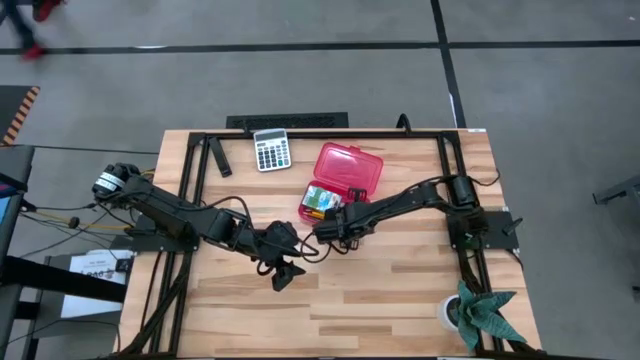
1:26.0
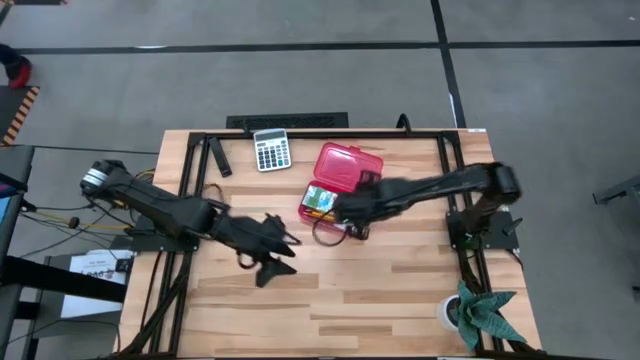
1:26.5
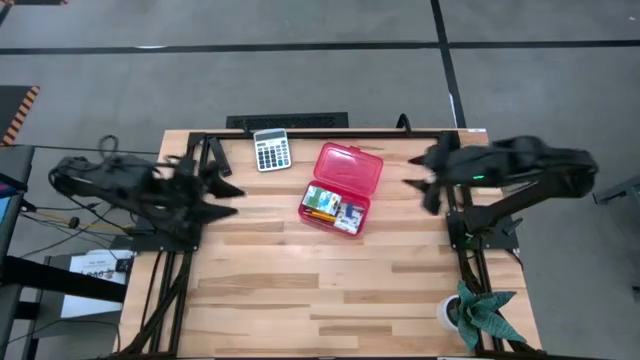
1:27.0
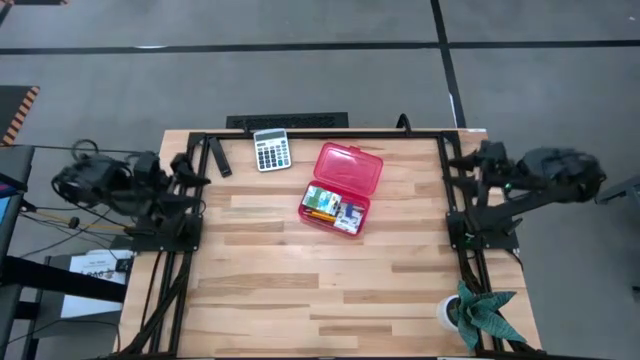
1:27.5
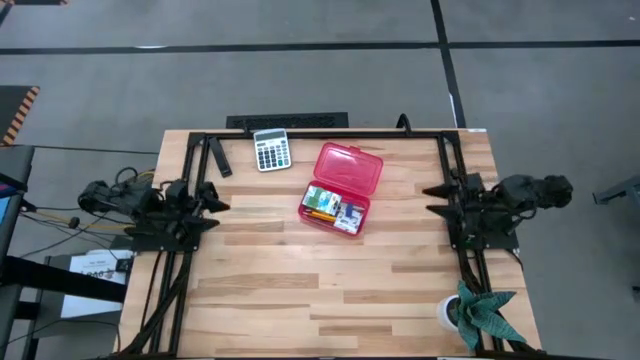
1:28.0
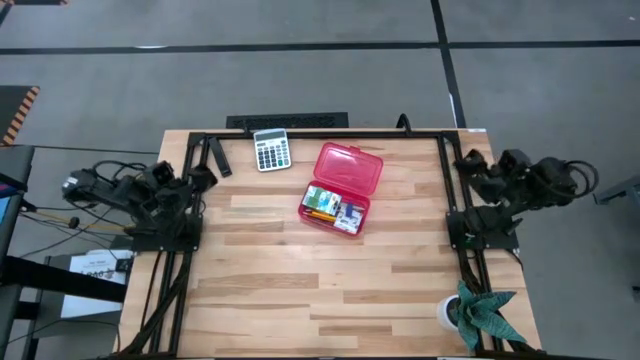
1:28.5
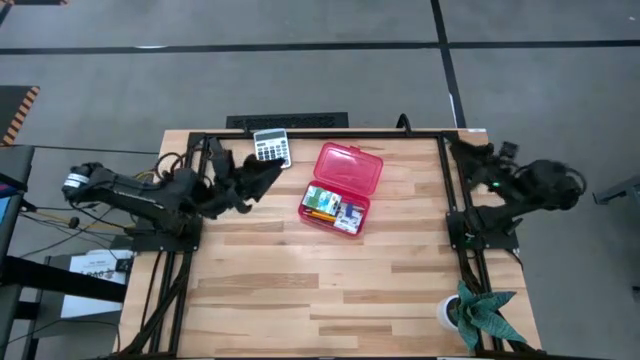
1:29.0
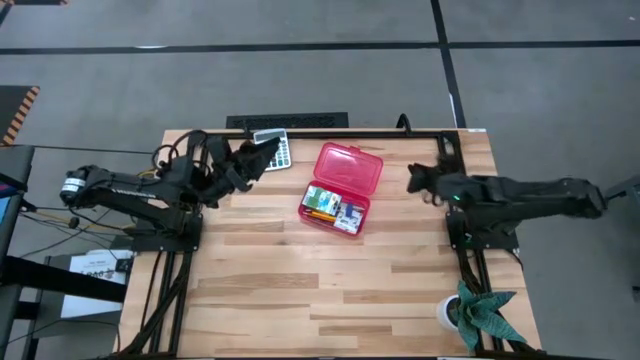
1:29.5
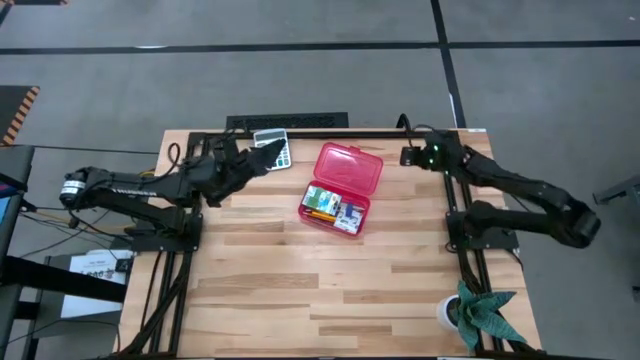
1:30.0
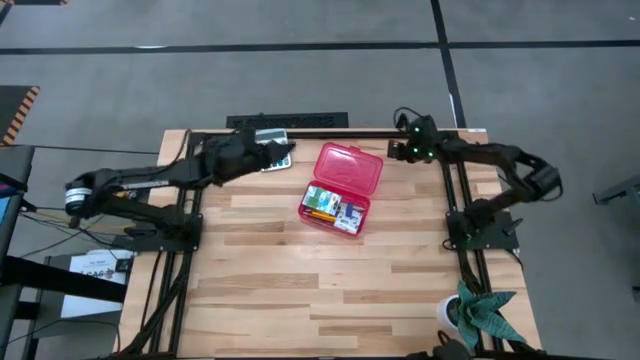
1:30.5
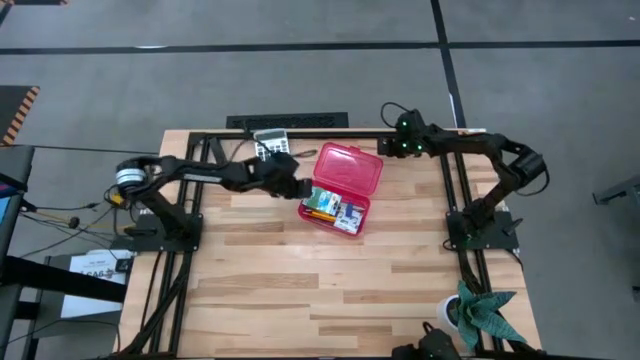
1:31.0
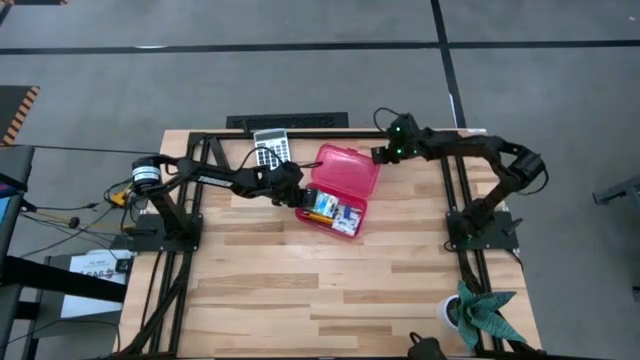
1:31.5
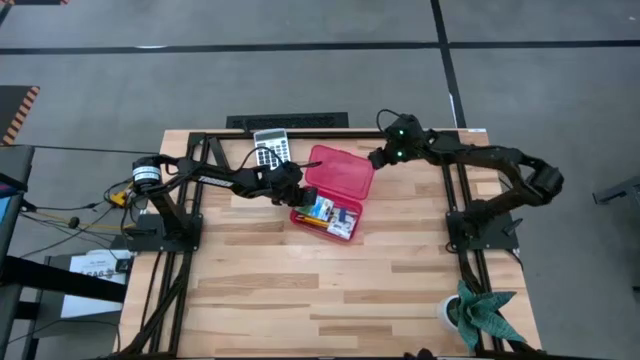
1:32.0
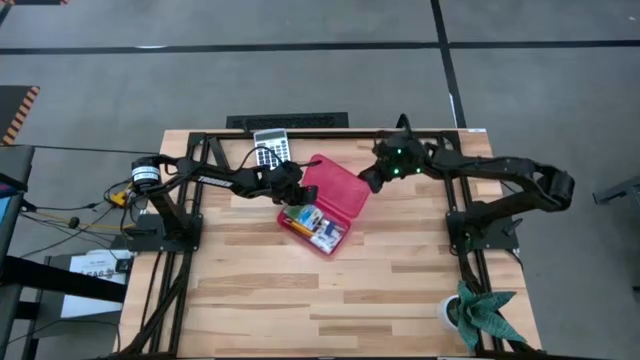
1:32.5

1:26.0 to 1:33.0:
Task: Pack school essentials
Close the supply box

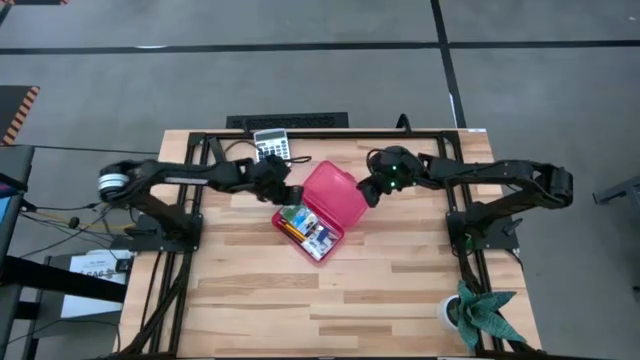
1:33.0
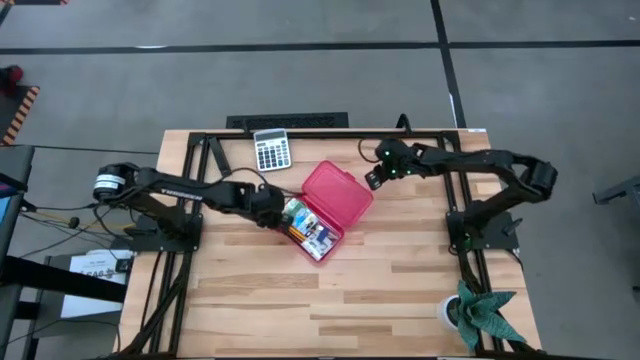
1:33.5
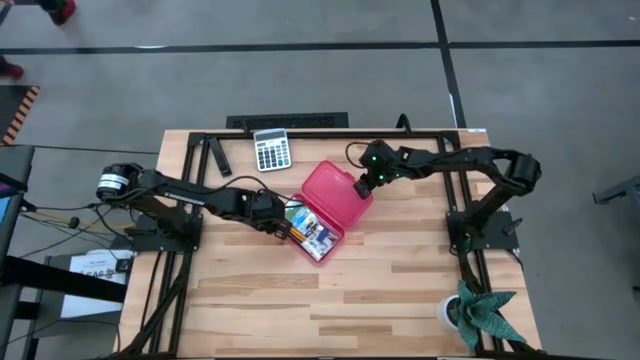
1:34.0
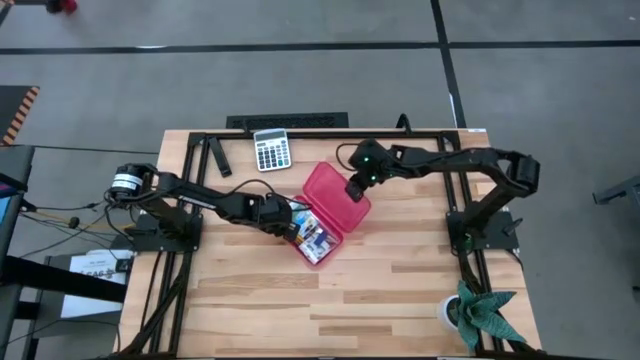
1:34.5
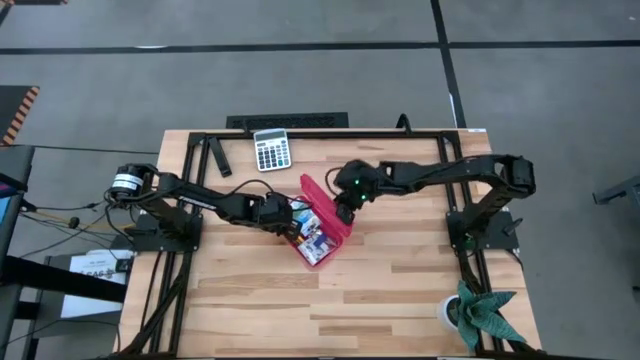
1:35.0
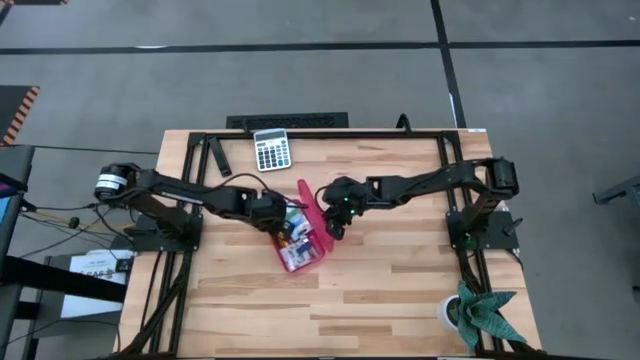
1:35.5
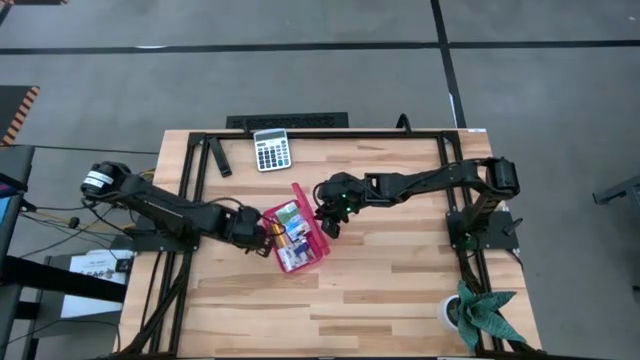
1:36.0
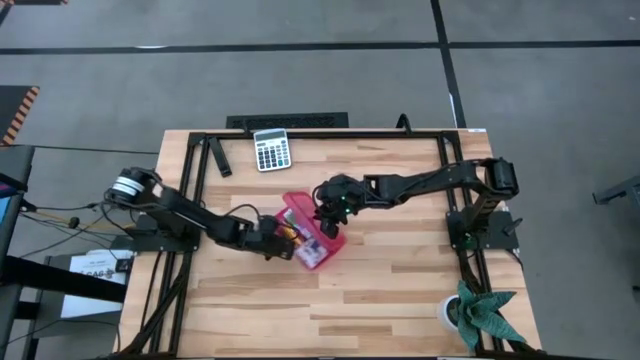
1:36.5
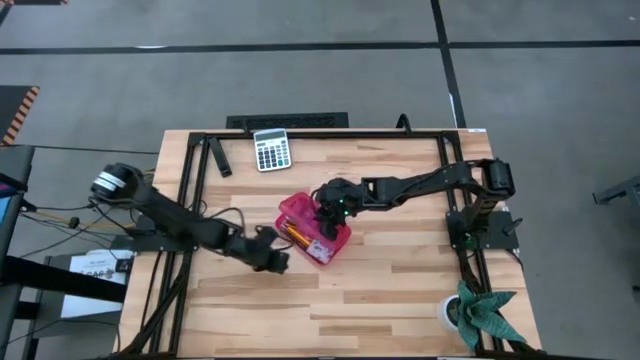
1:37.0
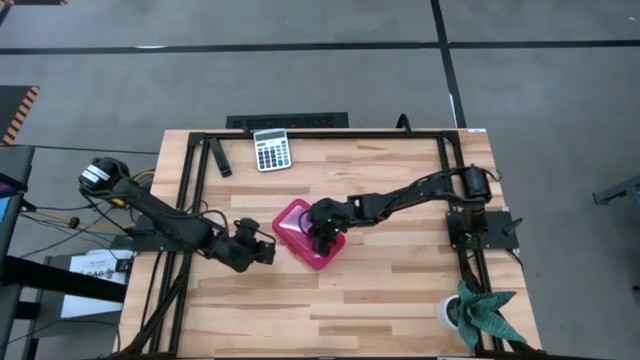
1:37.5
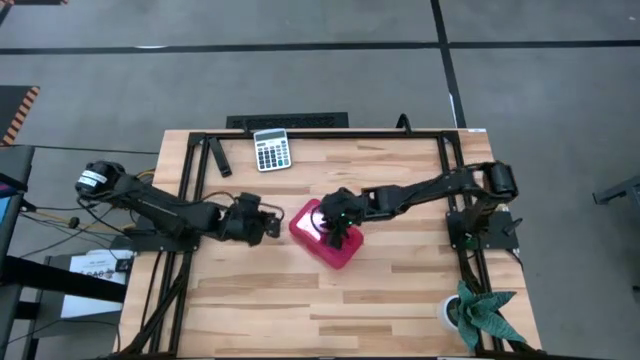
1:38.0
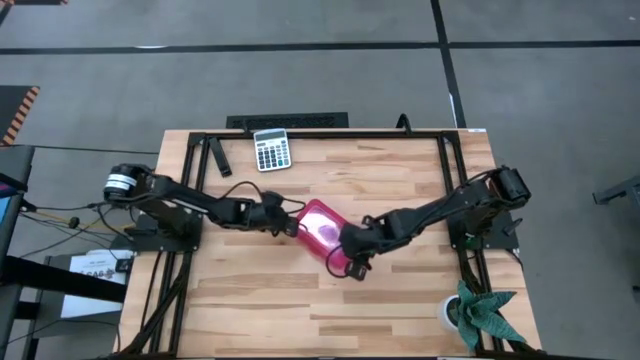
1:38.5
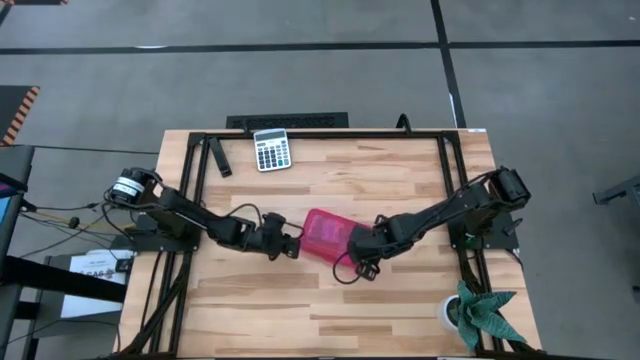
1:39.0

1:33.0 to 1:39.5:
Close the supply box

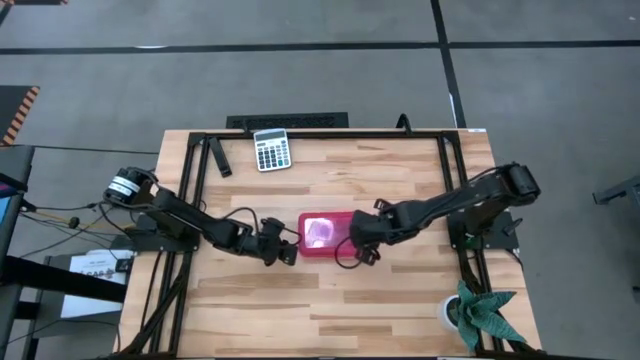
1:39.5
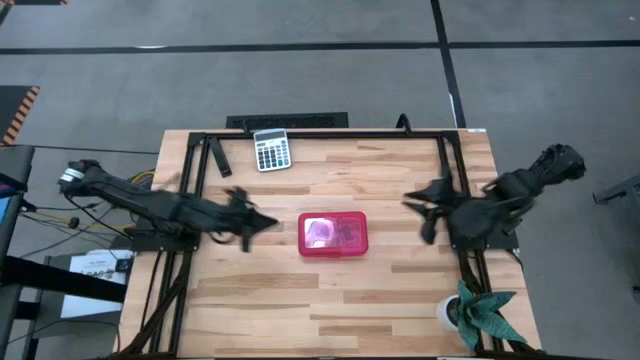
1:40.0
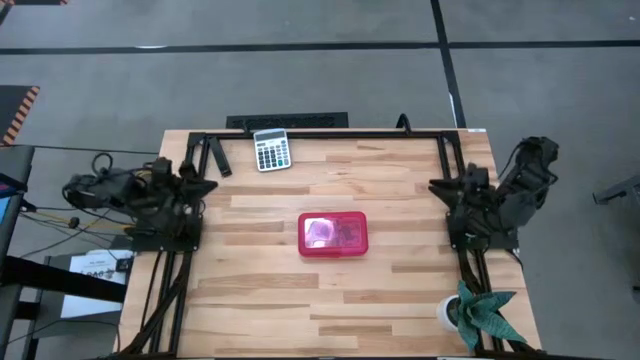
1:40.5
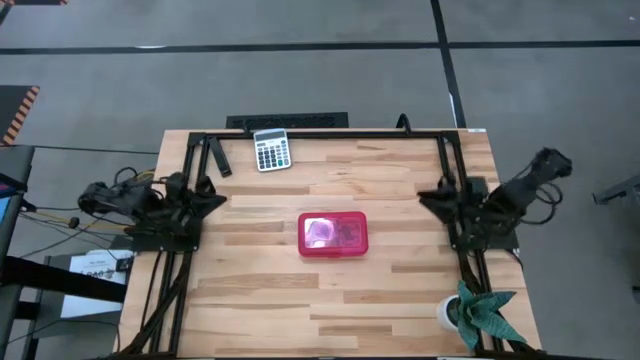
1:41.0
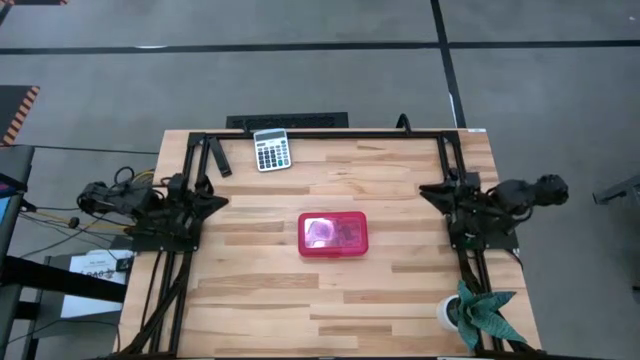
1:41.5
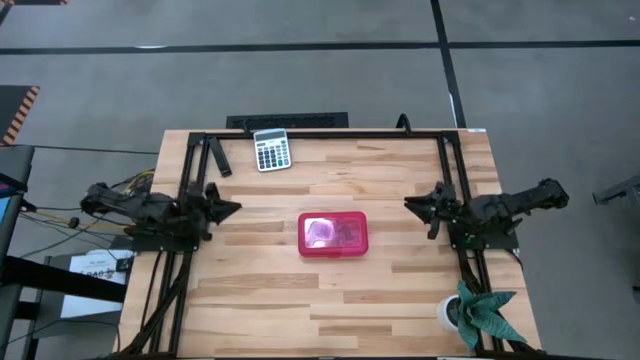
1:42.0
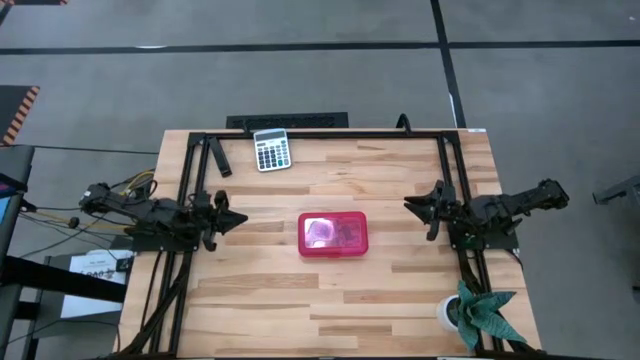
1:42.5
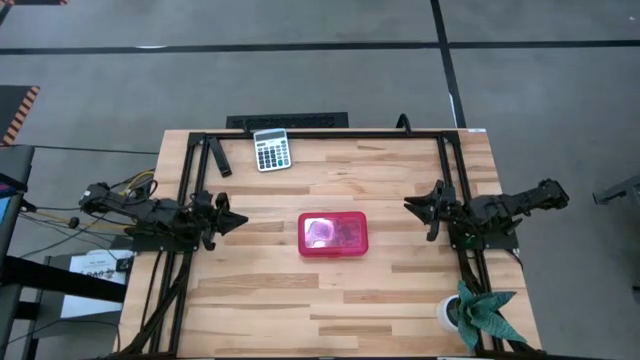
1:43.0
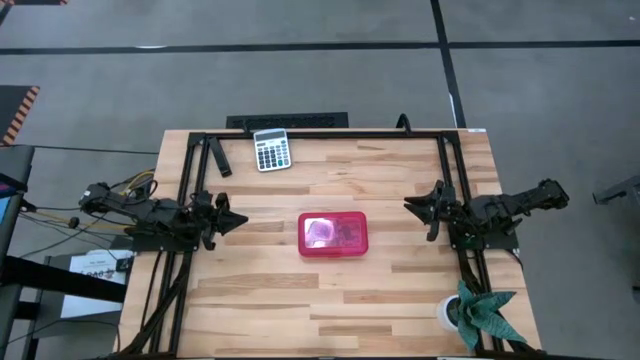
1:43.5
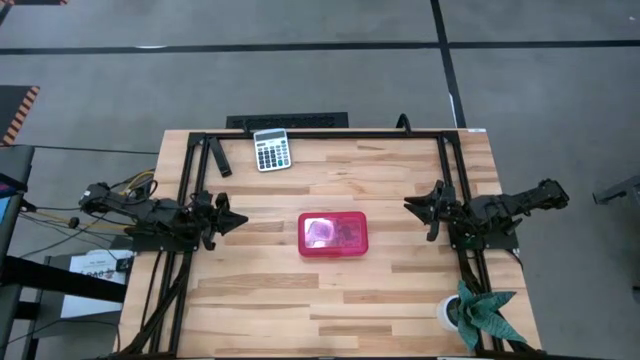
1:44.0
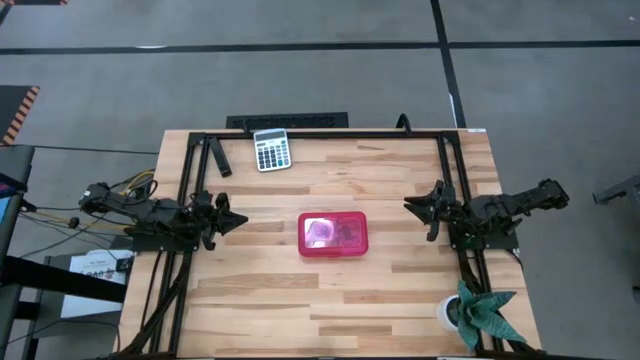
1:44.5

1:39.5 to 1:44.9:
Return to Home Position

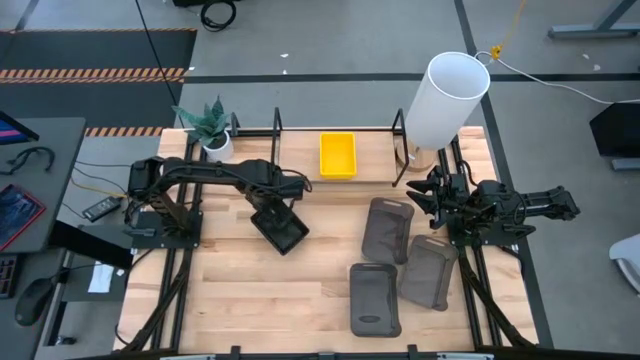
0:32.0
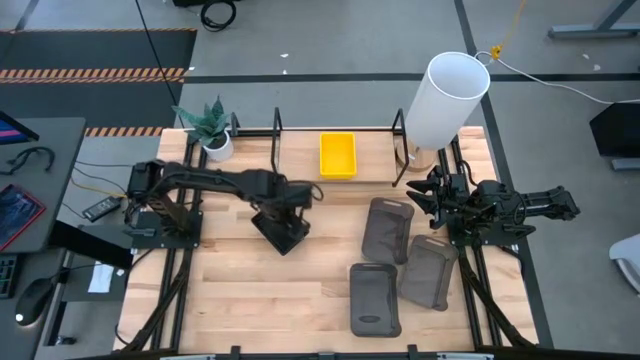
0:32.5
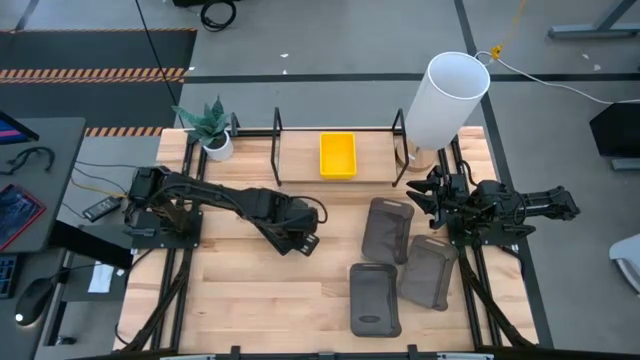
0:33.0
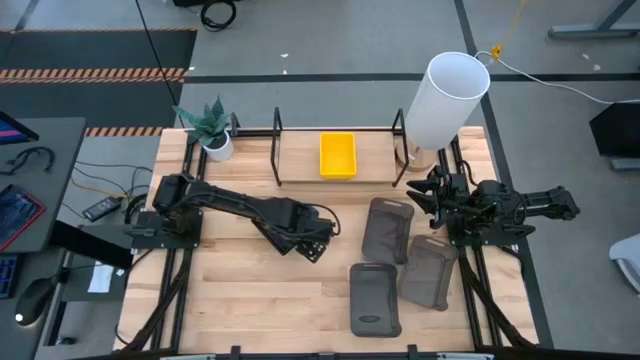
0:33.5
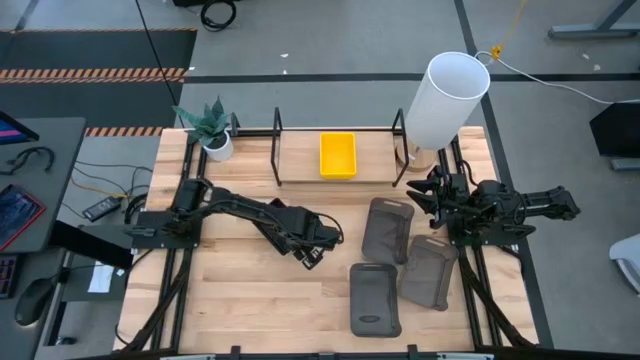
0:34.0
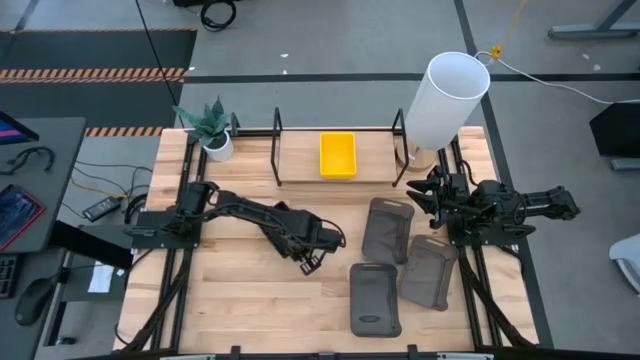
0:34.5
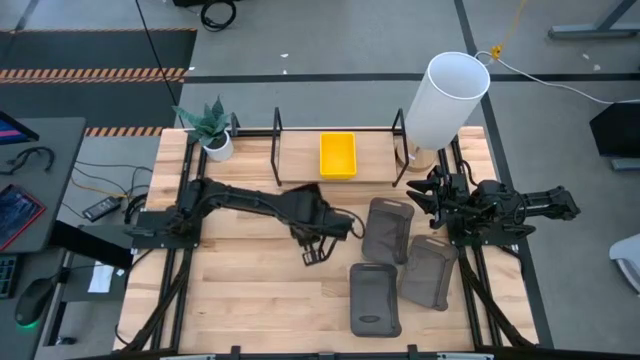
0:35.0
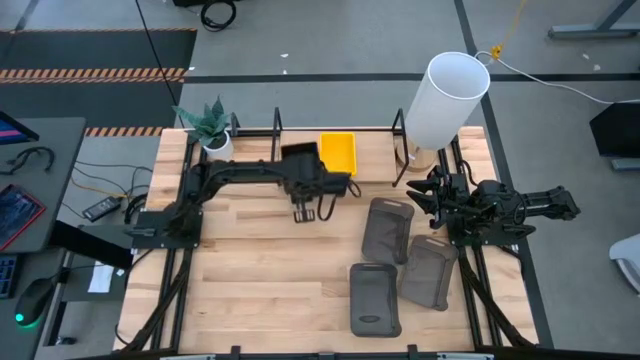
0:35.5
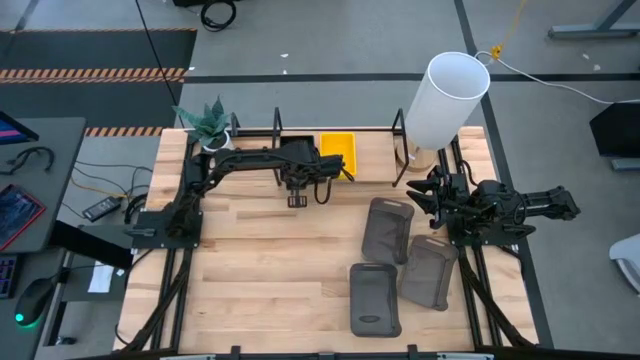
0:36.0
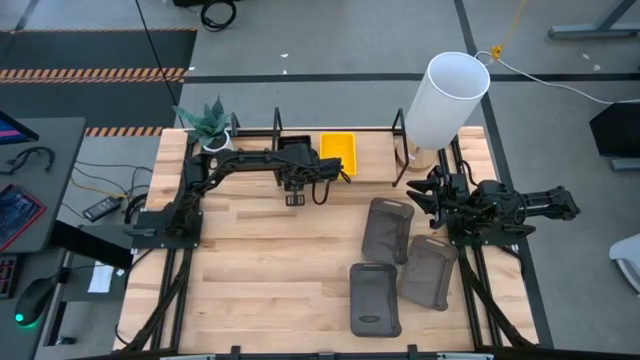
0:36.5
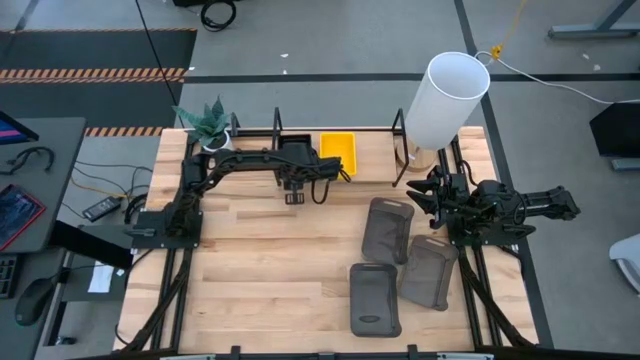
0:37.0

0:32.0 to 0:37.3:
Task: Stack baskets on shelf by color
Put the stacked black bins on the shelf
